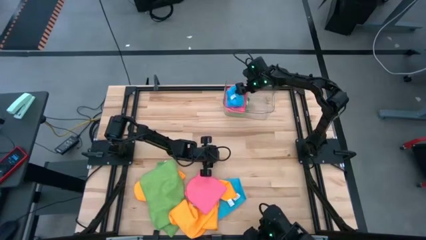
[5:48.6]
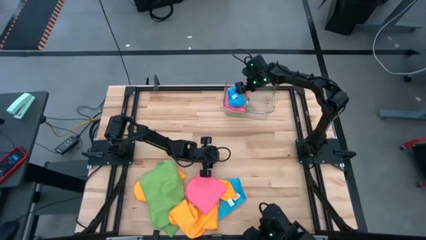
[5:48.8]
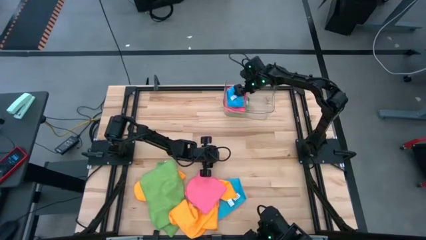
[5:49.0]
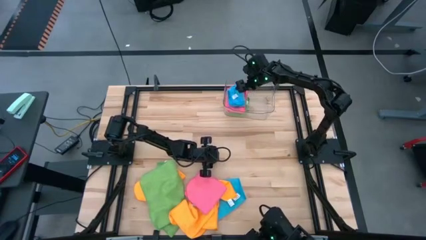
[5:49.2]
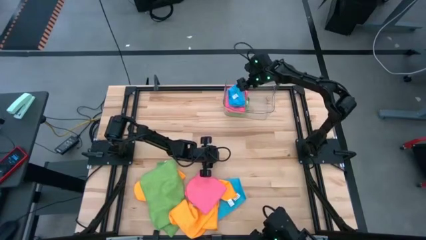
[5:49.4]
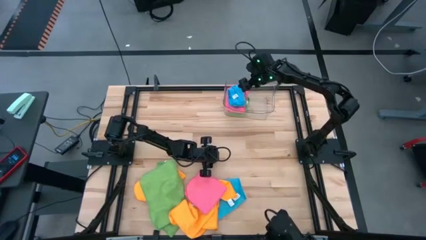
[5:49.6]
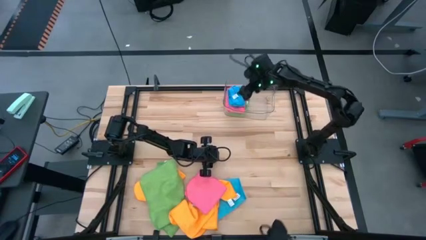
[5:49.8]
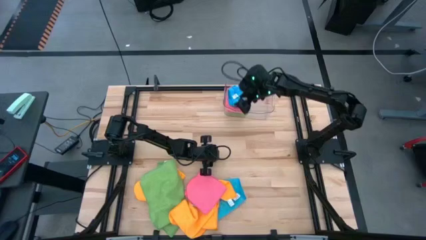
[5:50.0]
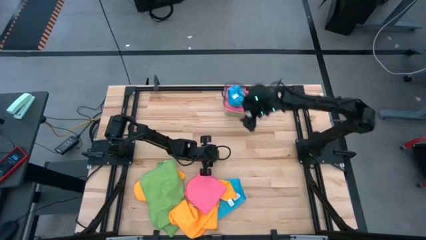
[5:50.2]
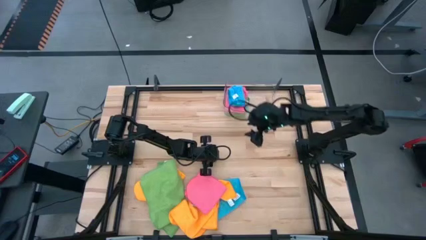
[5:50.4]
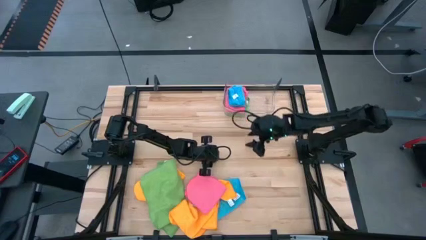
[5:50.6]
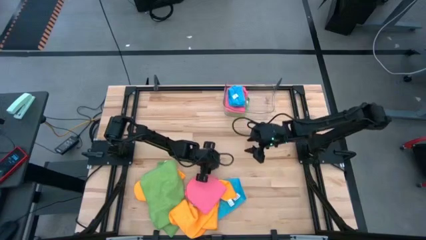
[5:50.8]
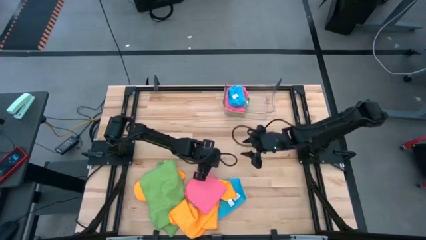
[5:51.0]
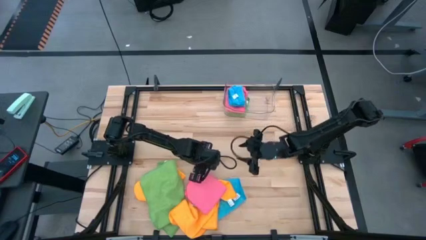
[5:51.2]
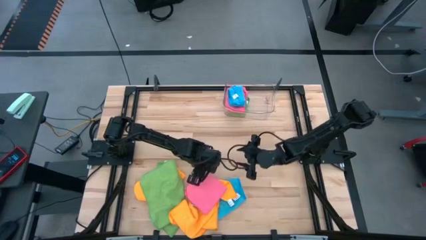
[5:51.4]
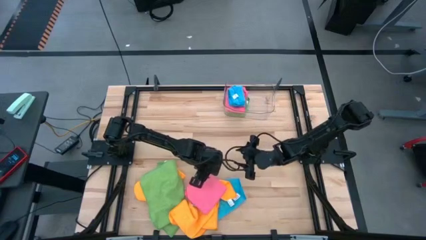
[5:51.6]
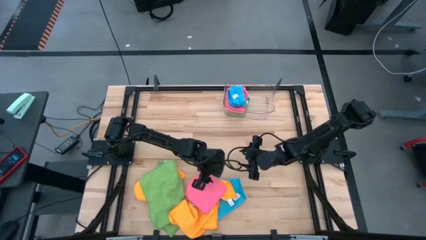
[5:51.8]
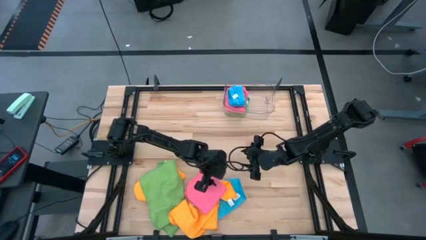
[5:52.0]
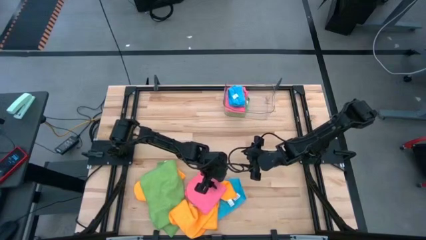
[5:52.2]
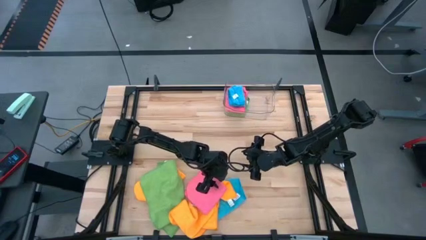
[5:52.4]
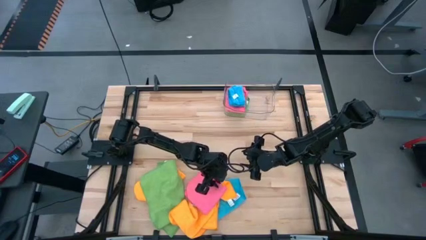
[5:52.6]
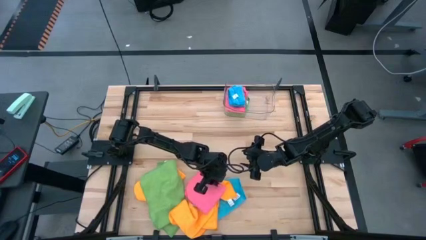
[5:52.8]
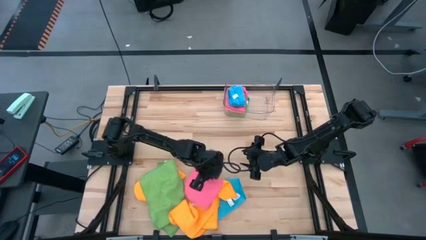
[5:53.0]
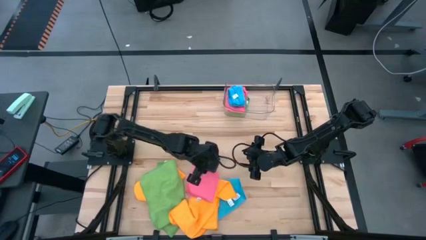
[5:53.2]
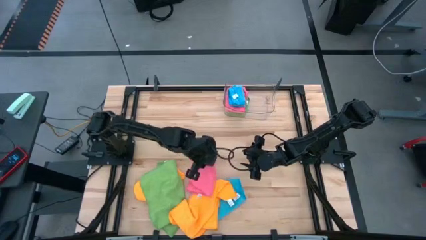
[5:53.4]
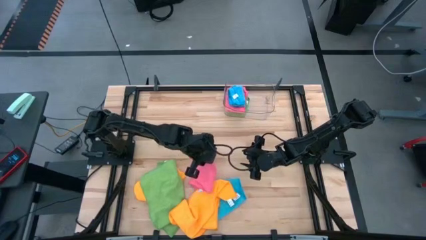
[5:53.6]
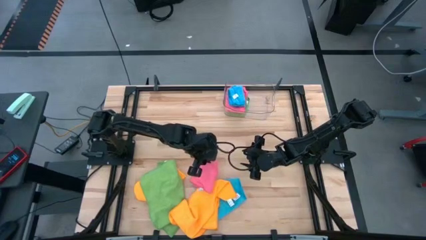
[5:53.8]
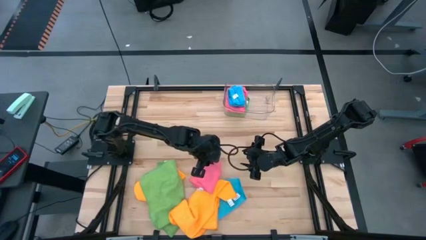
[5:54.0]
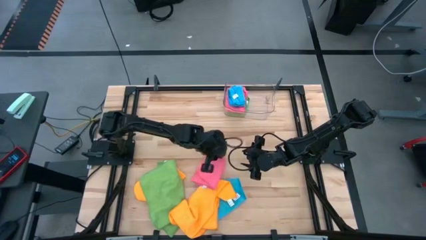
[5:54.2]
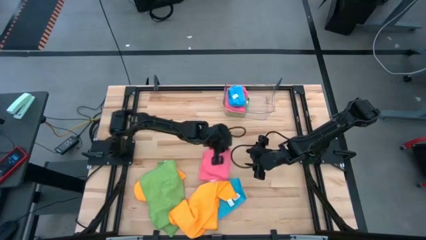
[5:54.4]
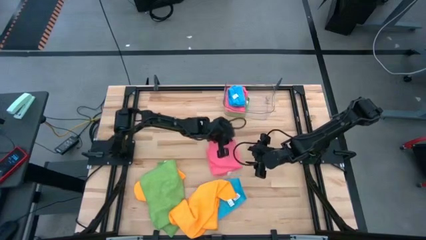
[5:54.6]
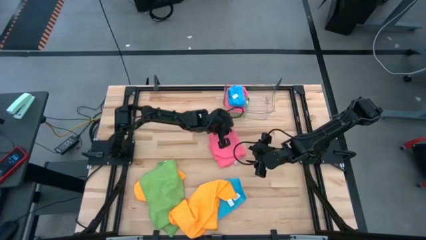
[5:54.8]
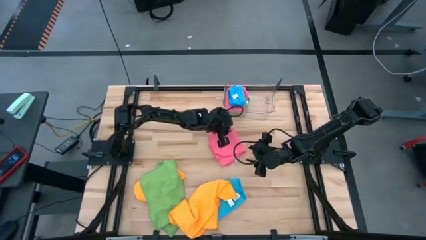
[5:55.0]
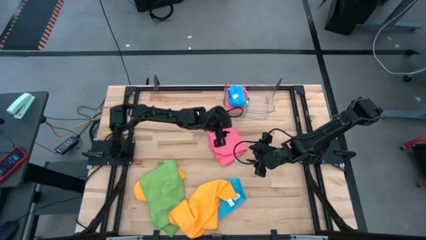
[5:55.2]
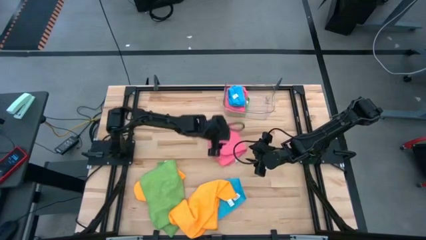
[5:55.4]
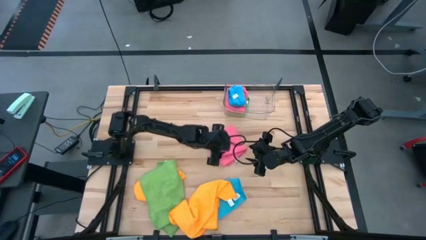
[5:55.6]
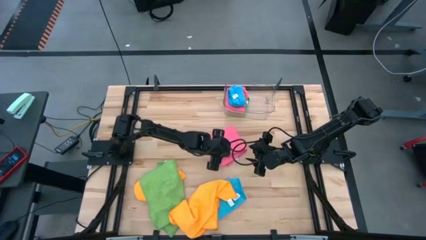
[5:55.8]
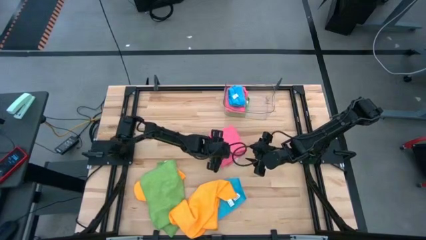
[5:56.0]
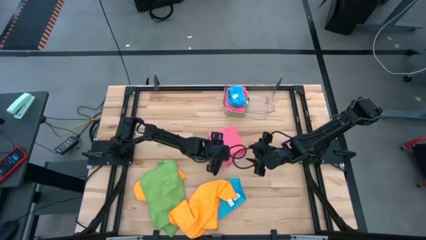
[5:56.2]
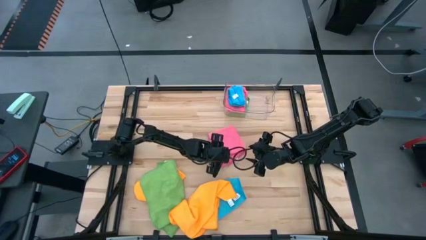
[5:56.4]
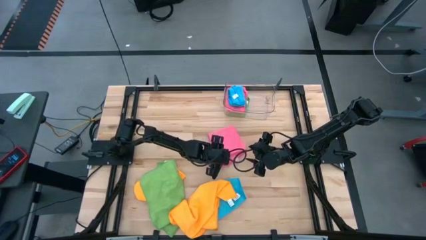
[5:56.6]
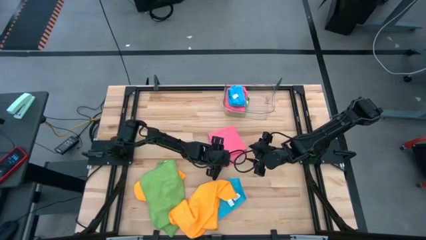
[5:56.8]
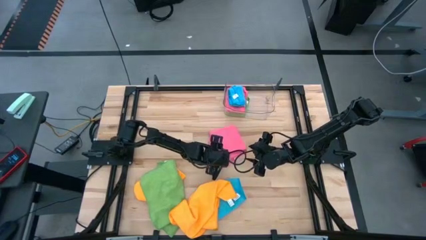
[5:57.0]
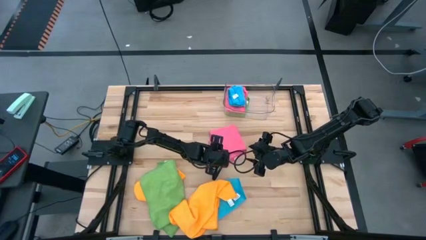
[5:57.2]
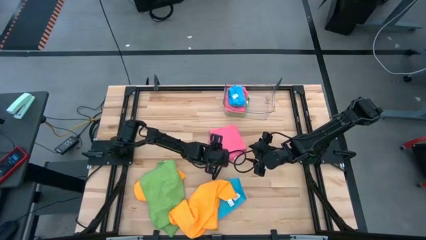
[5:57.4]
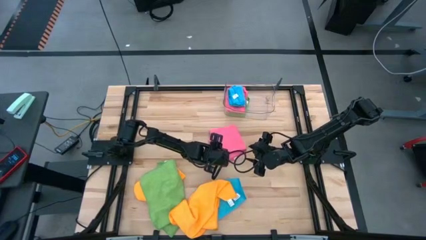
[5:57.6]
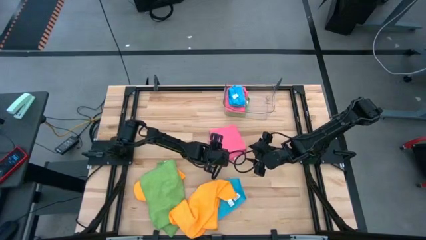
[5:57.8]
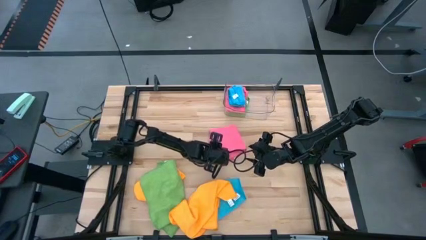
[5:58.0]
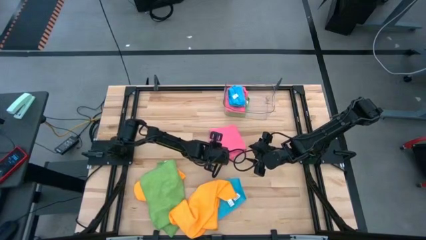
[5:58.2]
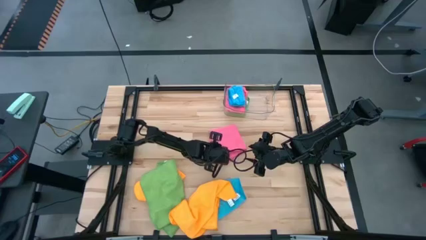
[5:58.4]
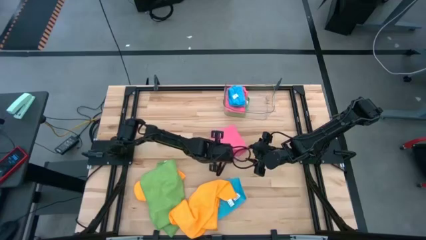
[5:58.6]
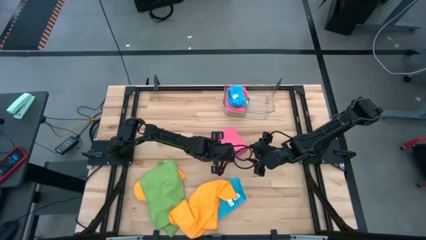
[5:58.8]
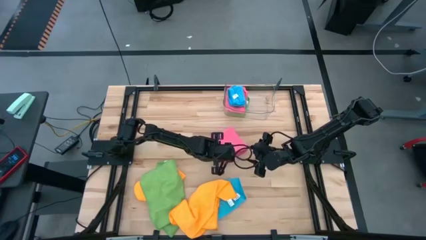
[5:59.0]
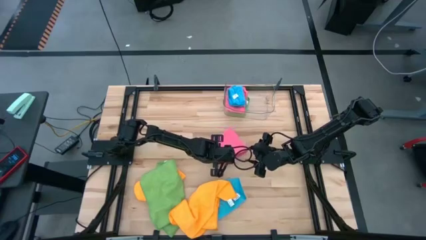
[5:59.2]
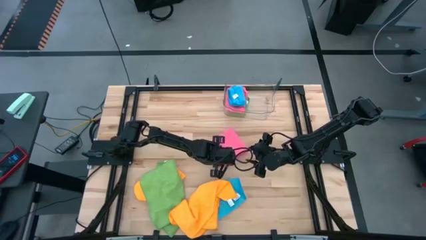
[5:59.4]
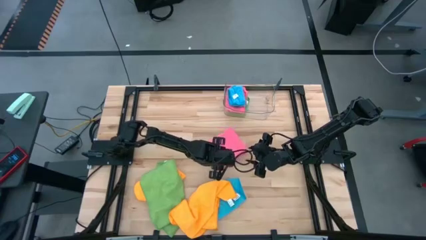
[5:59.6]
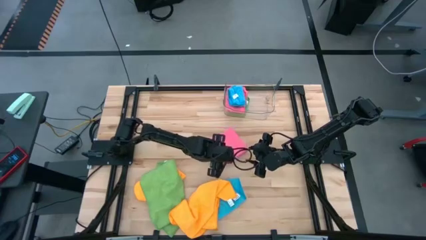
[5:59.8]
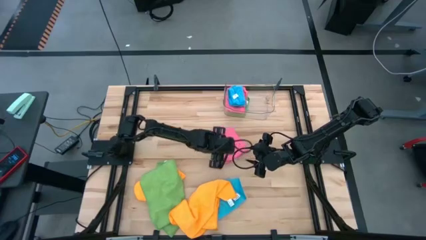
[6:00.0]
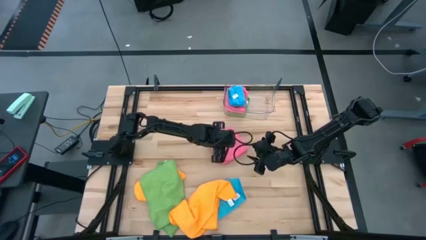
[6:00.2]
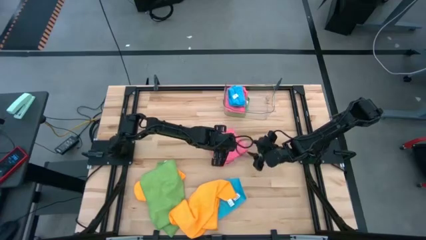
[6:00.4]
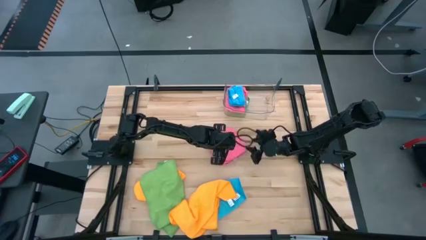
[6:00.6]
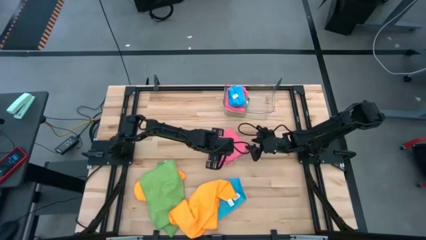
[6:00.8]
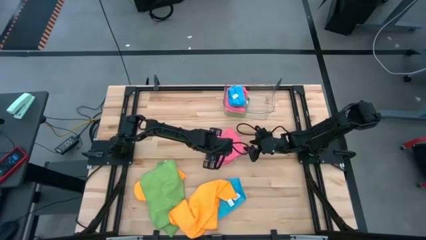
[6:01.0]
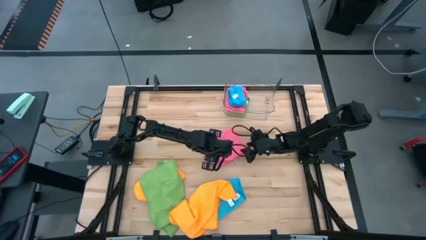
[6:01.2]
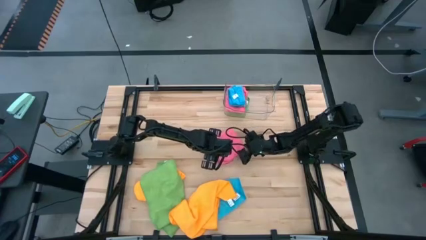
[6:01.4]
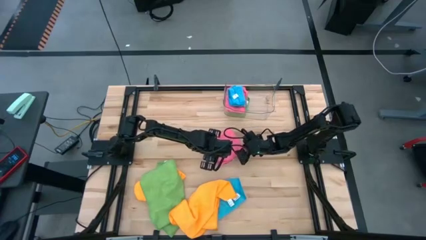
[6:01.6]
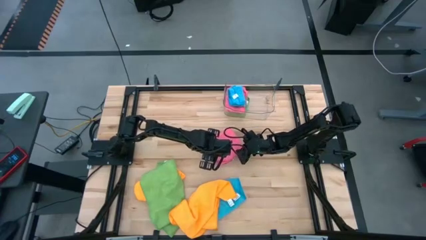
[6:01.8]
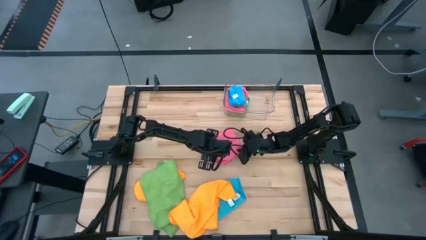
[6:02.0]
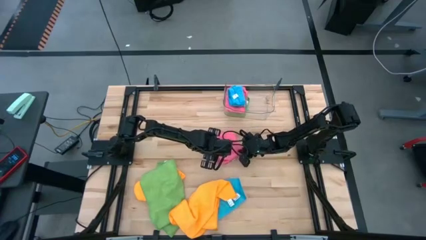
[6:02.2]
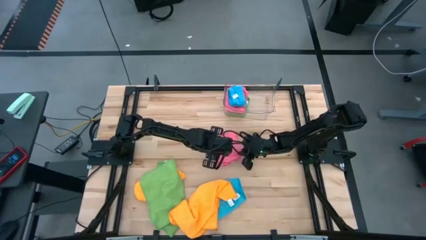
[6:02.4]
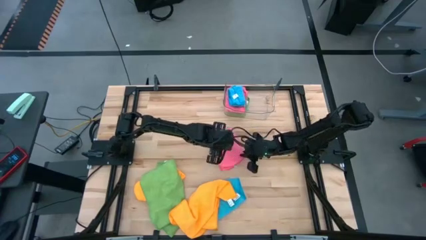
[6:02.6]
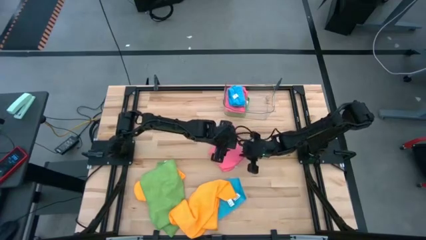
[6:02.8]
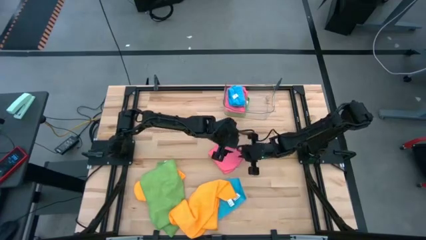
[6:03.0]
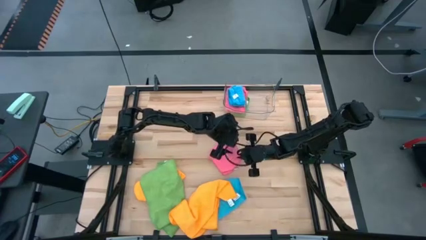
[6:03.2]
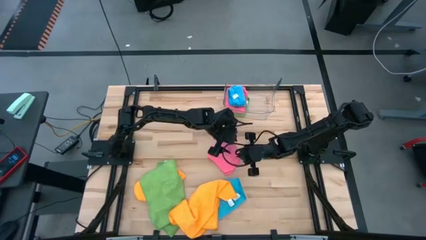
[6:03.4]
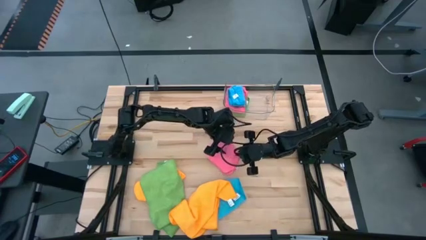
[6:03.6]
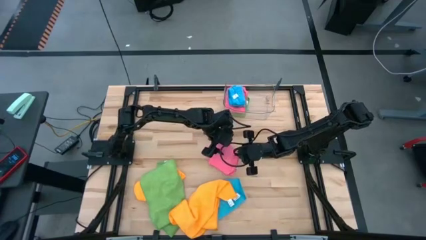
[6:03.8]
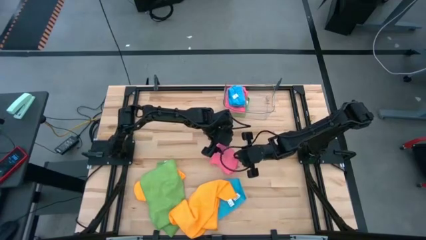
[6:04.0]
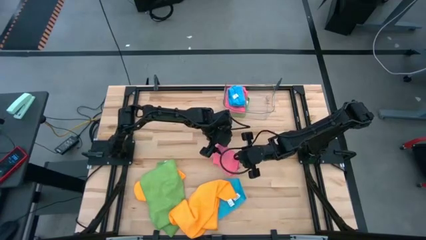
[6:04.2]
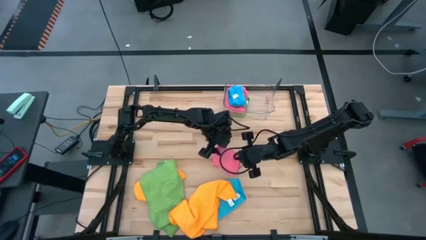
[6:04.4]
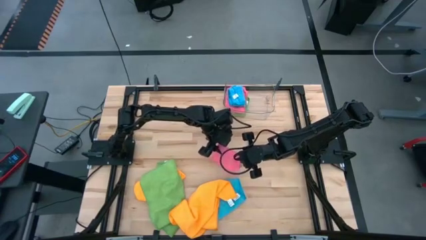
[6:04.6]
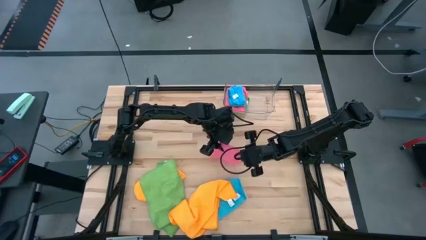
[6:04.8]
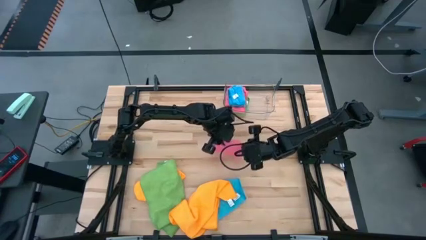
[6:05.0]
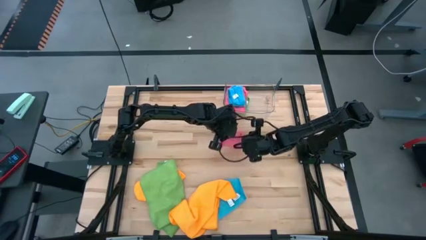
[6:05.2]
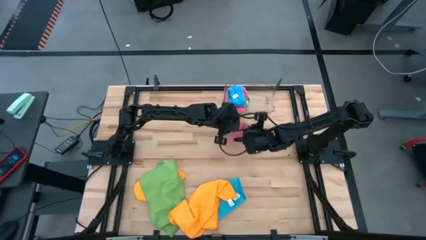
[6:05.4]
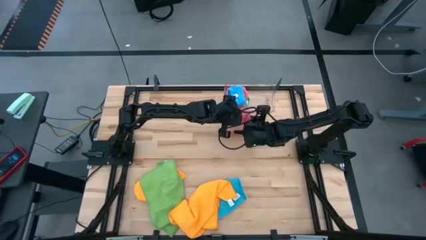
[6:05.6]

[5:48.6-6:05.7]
Task: Fold microfiber towels
Fold the pink towel
